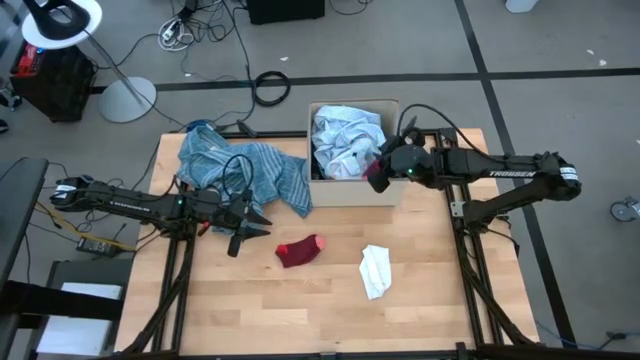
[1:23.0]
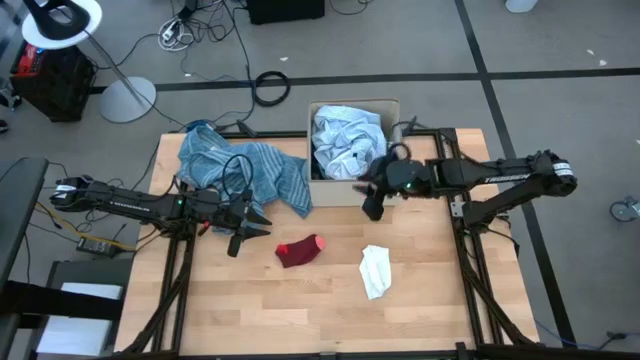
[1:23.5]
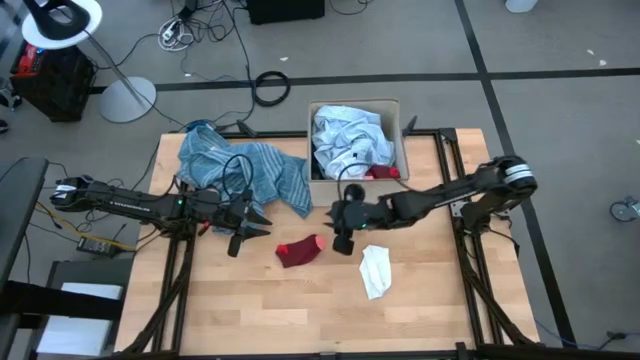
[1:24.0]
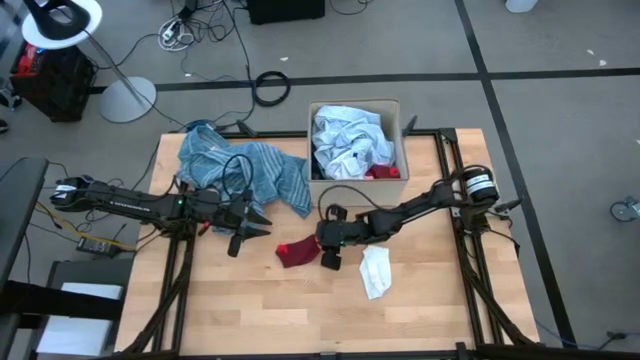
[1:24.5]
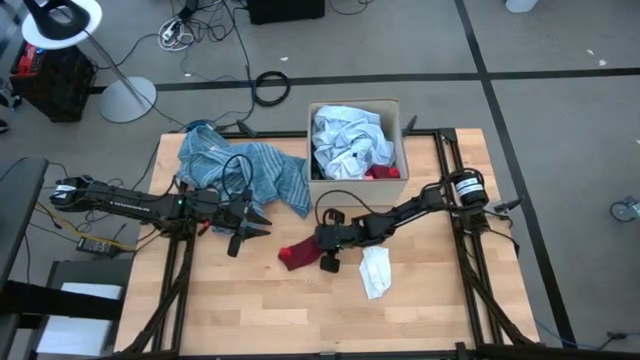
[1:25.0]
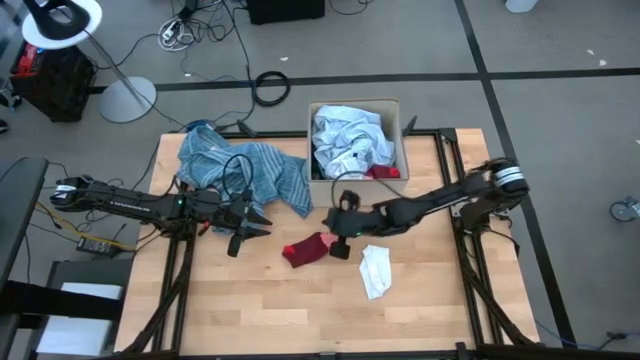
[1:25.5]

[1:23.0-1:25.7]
Task: Sort clothes
Put the red sock into the gray laundry bin

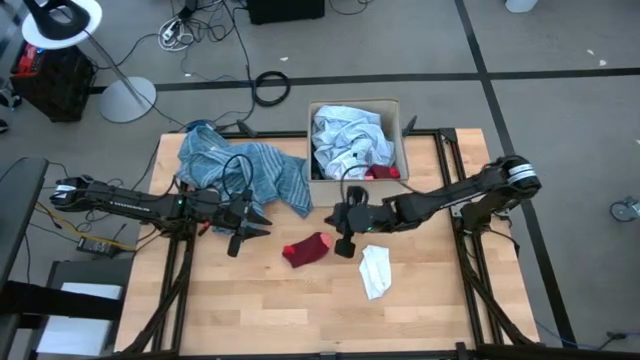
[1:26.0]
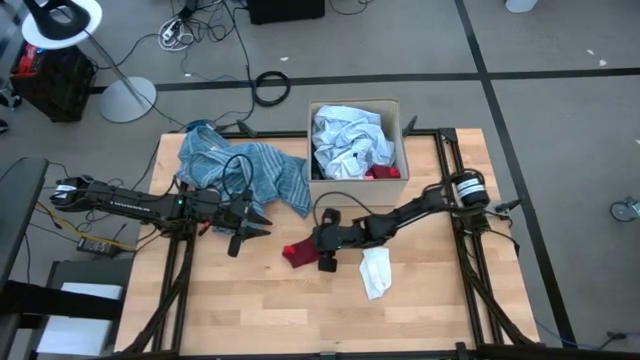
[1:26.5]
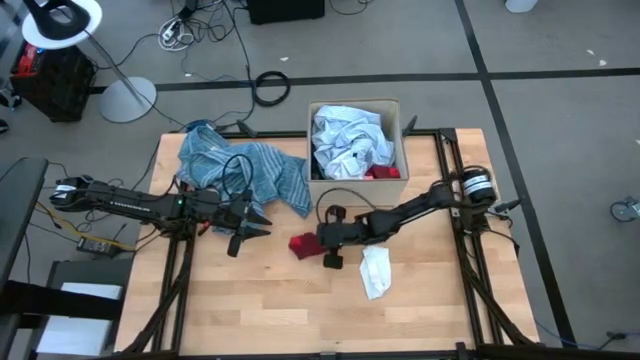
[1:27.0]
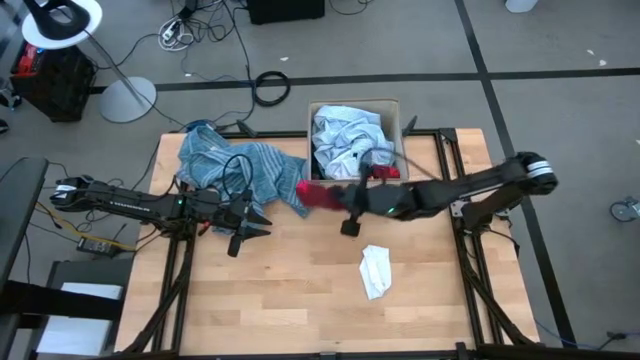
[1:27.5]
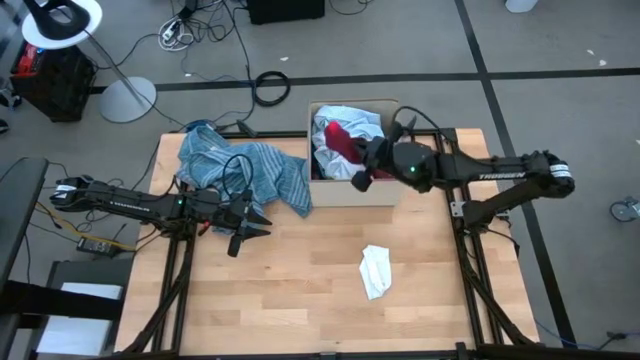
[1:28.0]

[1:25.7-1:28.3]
Put the red sock into the gray laundry bin

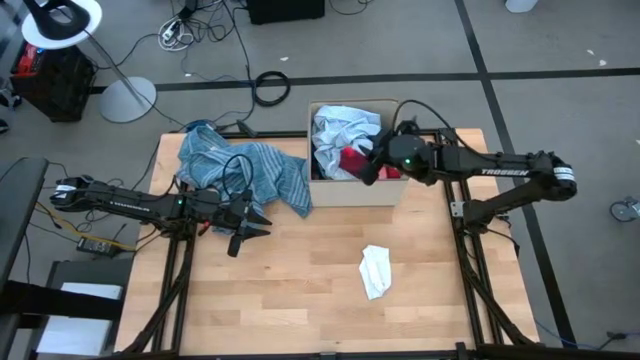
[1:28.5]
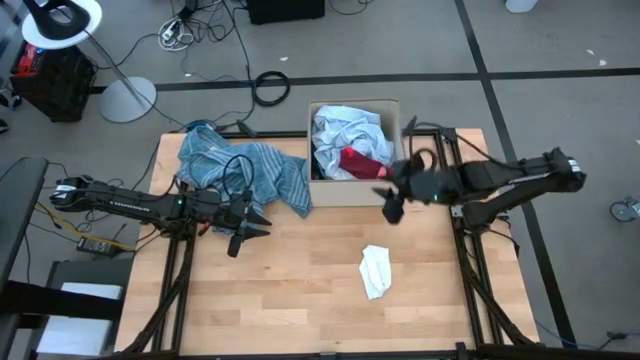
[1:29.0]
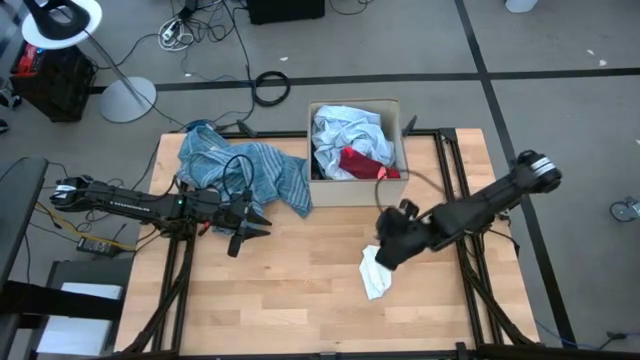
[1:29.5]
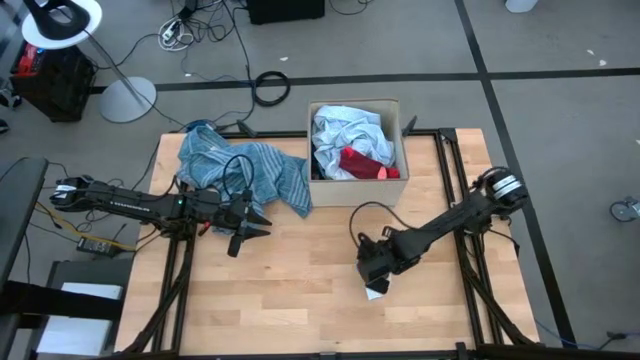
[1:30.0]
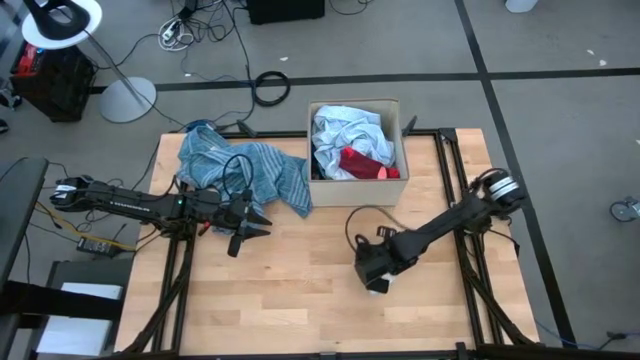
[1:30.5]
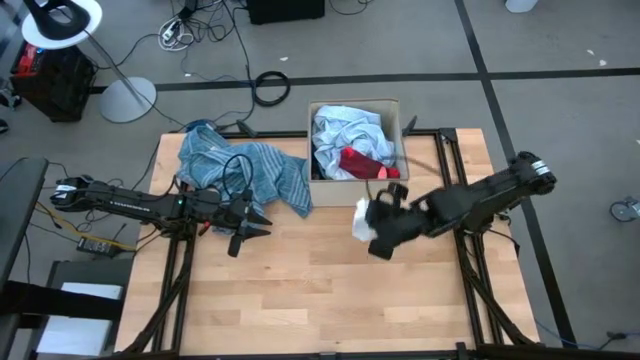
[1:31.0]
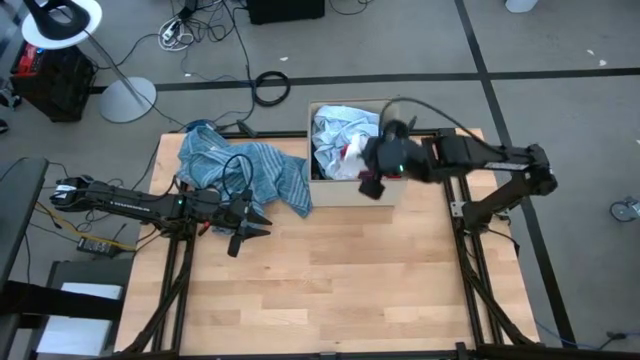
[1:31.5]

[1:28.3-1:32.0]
Put the white towel into the gray laundry bin

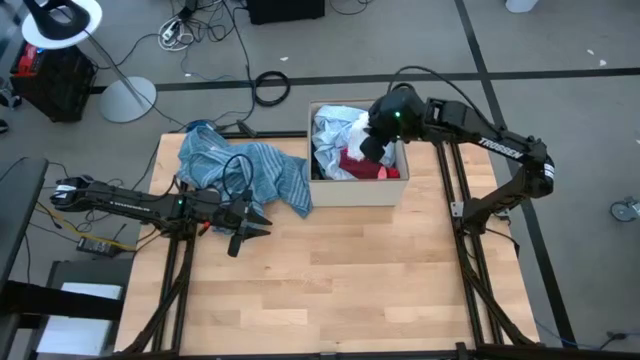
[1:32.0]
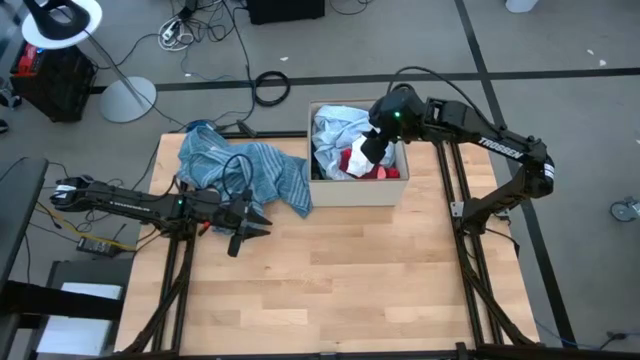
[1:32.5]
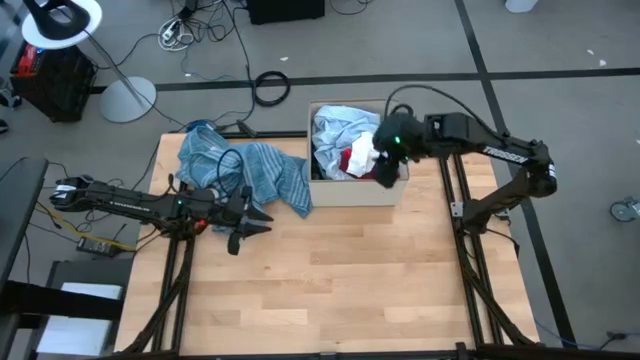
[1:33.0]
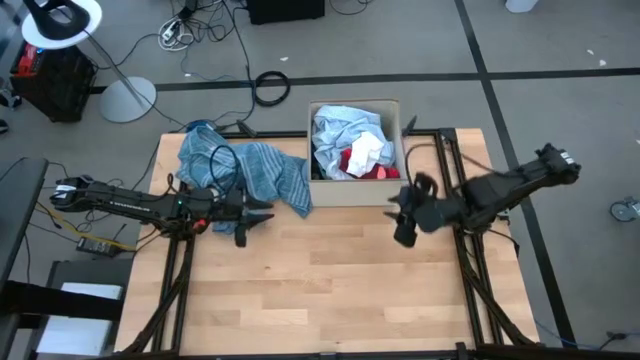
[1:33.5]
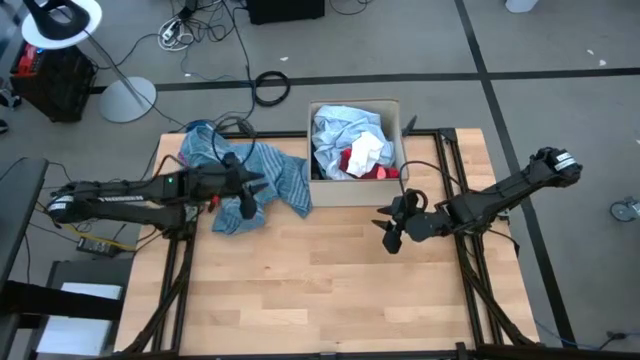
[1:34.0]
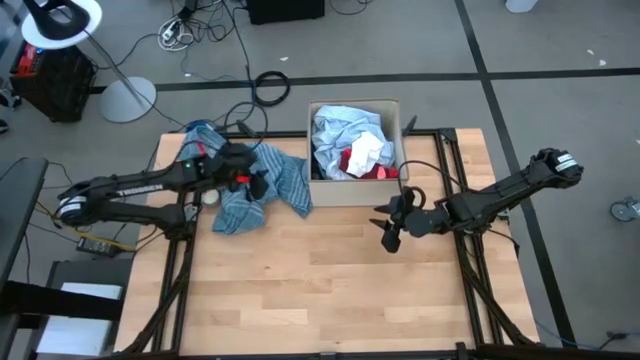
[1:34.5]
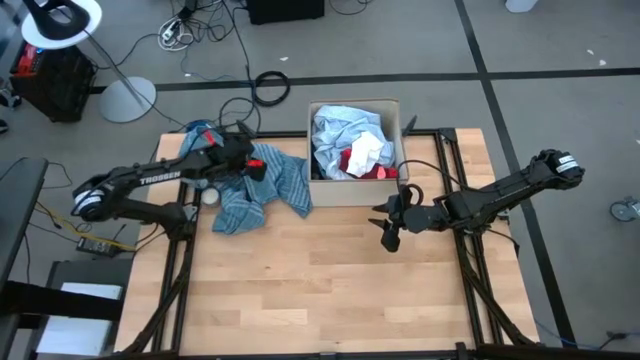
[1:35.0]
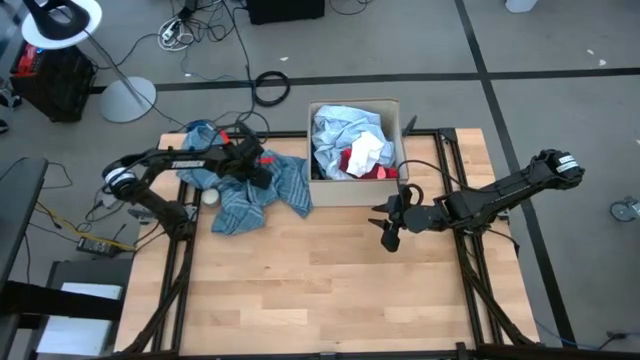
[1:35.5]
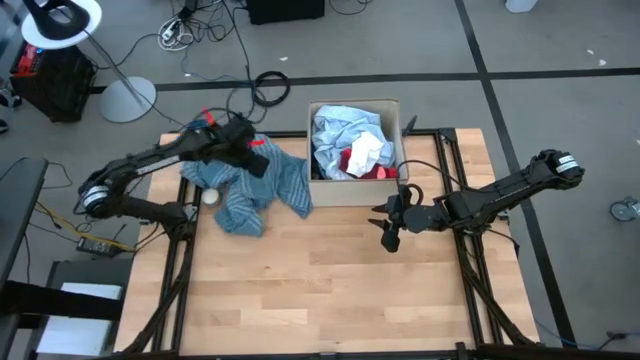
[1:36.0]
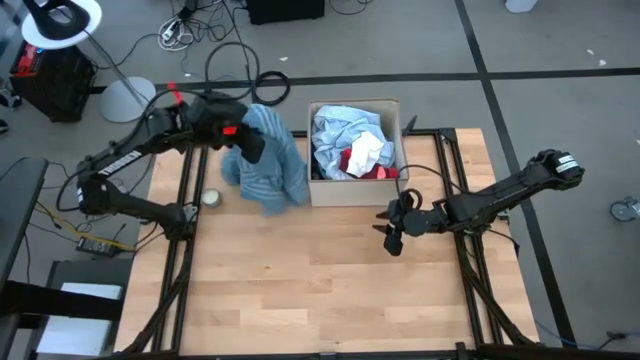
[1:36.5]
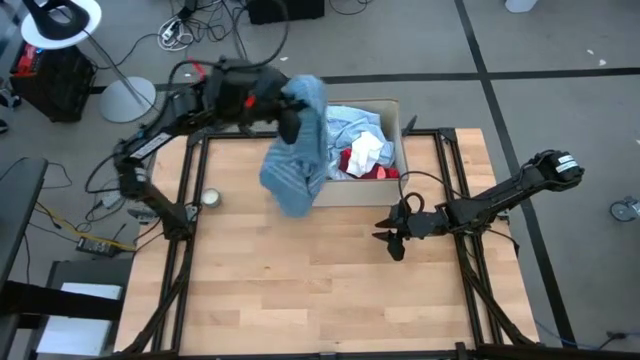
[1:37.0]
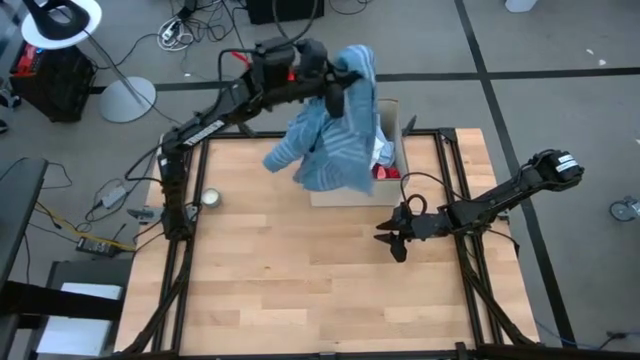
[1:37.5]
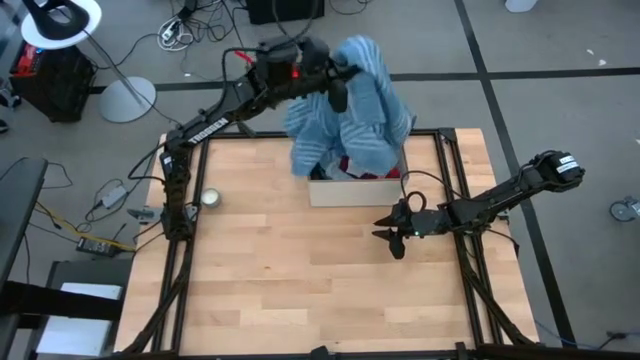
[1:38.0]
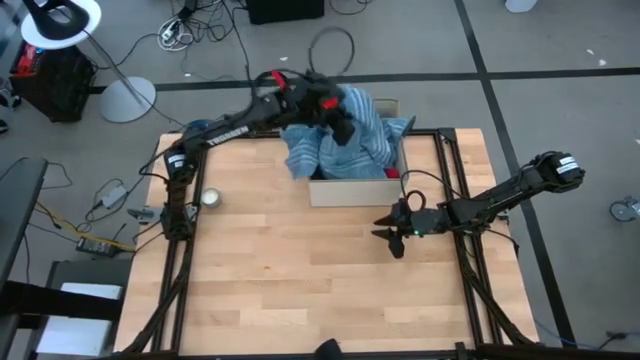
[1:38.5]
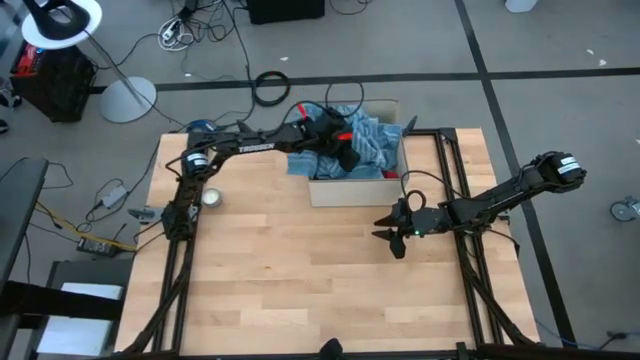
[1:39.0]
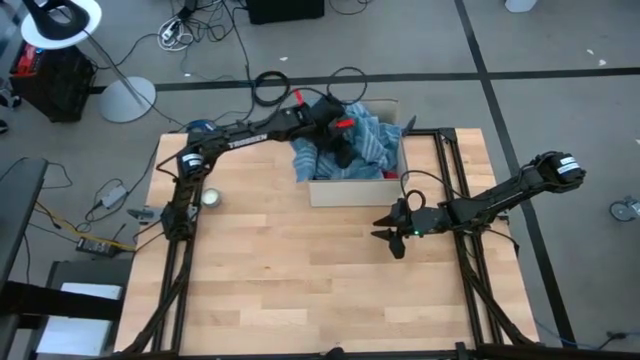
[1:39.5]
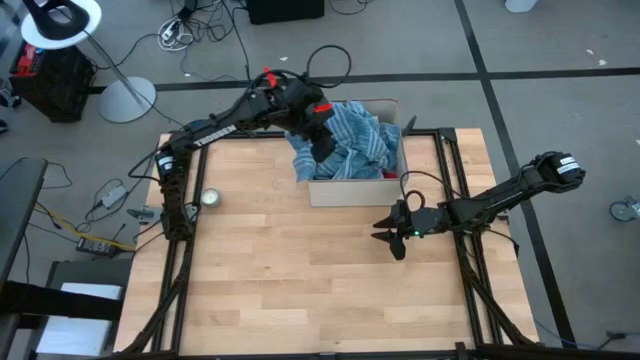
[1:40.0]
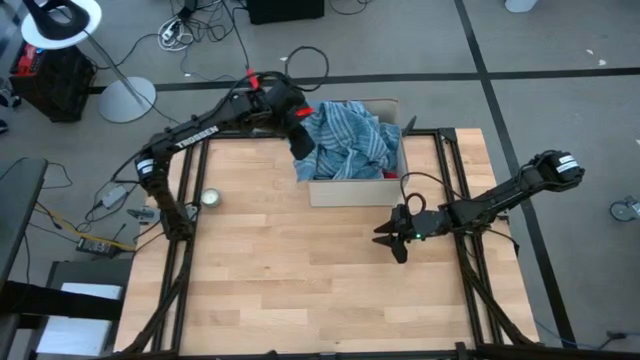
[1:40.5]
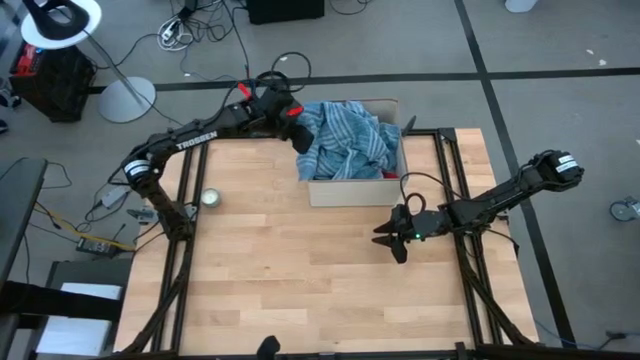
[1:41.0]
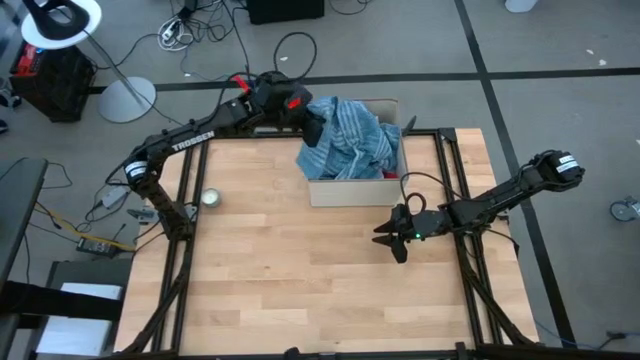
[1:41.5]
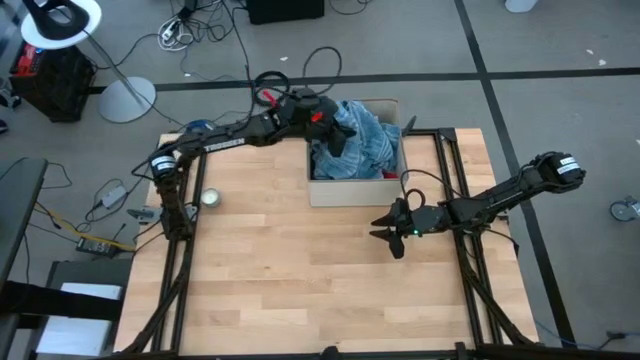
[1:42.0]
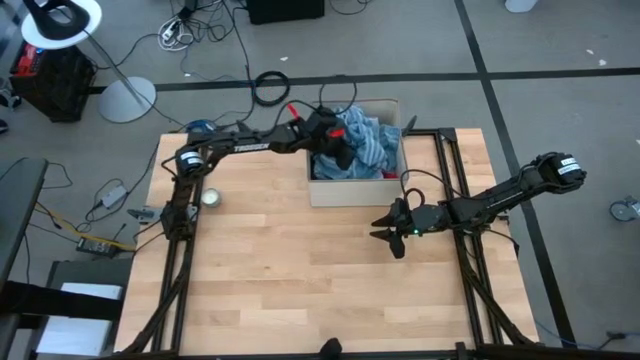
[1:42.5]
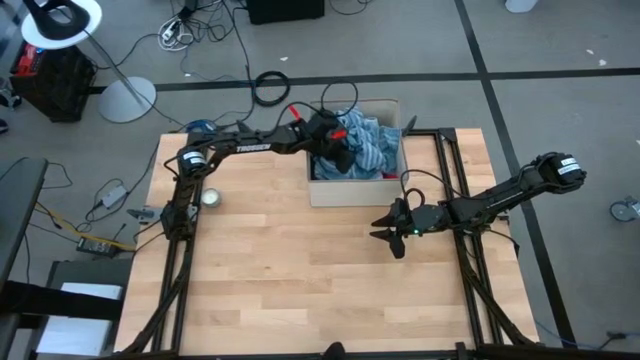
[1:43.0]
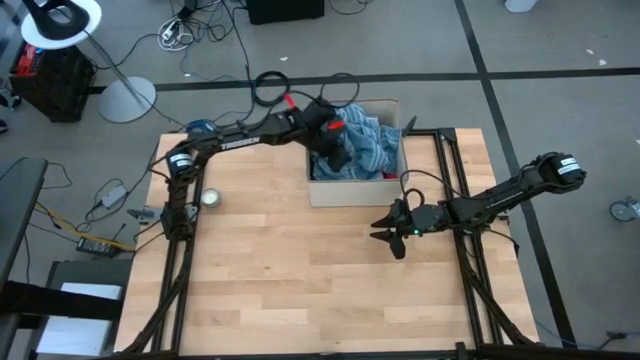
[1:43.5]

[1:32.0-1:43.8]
Put the blue towel into gray laundry bin

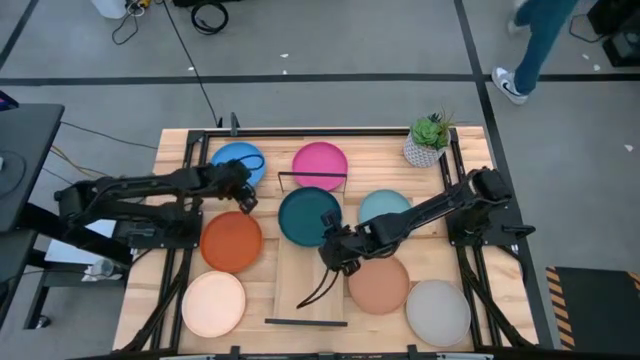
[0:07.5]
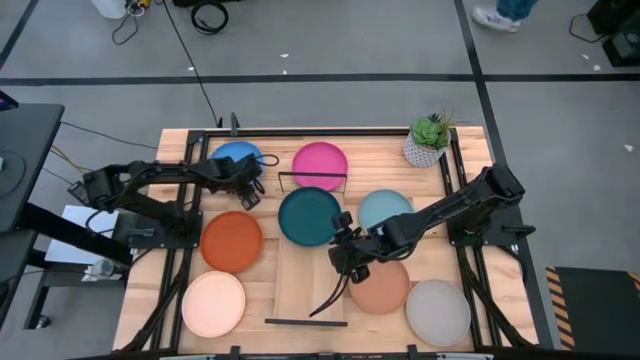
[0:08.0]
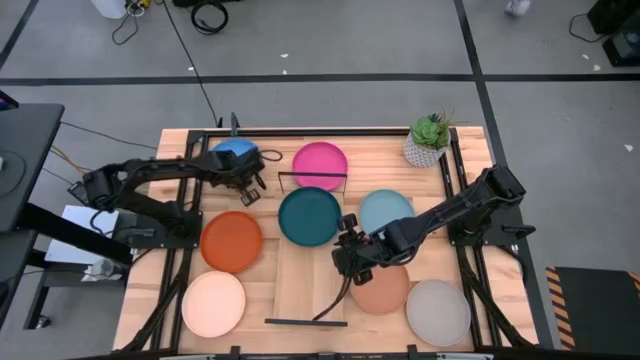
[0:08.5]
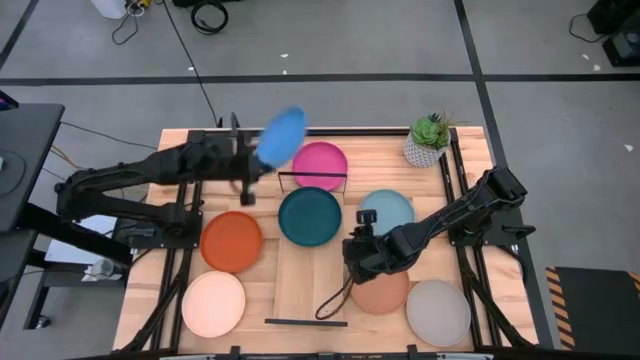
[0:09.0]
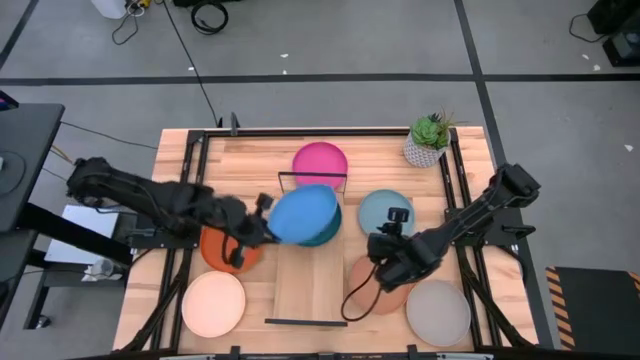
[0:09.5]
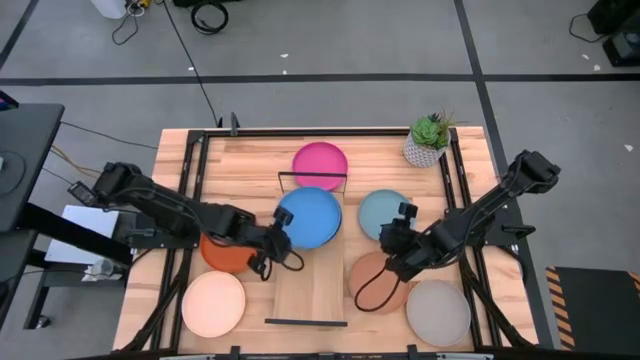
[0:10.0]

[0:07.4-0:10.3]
Task: Place and stack plates onto a shelf
Stack the blue plate on top of the green plate
